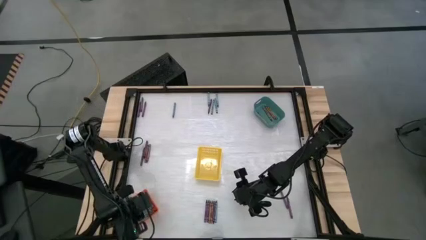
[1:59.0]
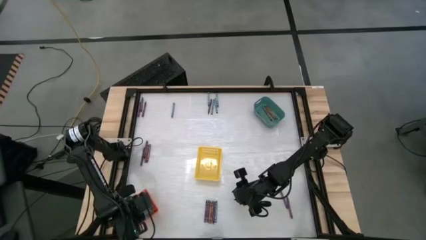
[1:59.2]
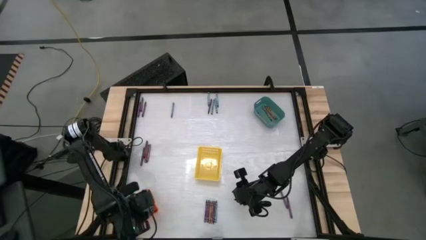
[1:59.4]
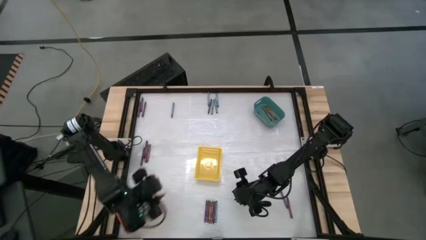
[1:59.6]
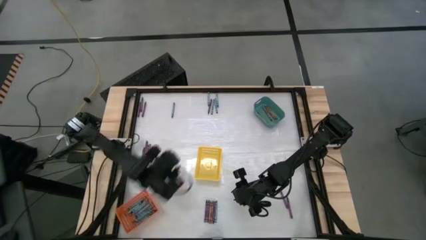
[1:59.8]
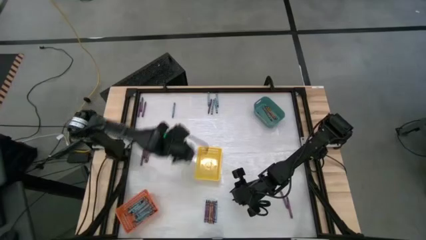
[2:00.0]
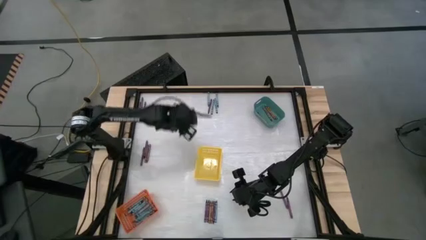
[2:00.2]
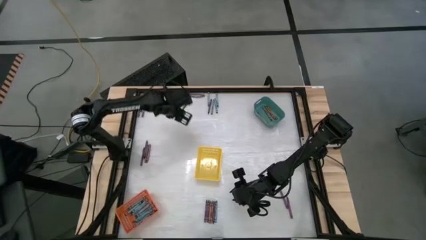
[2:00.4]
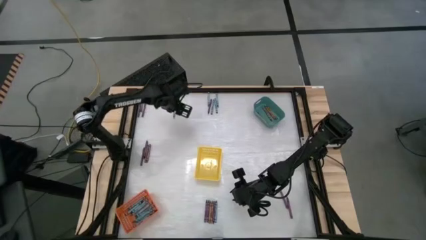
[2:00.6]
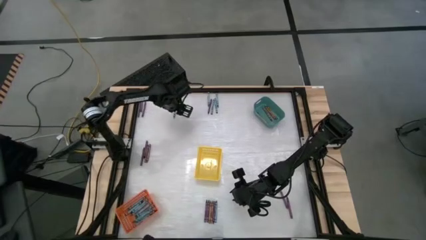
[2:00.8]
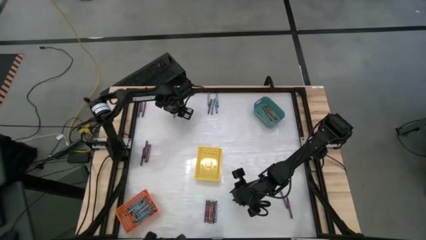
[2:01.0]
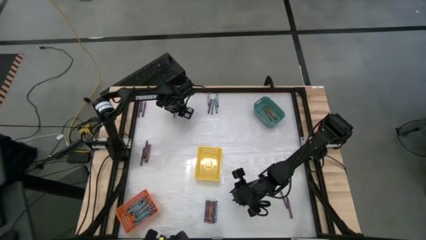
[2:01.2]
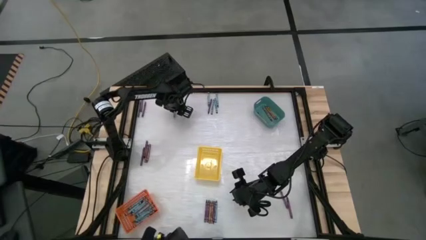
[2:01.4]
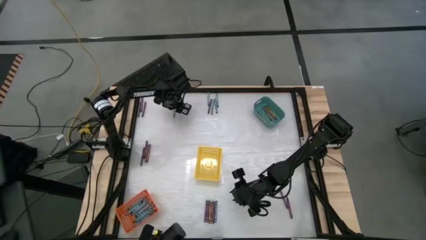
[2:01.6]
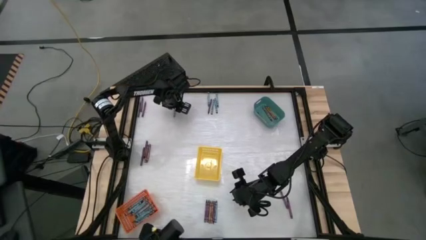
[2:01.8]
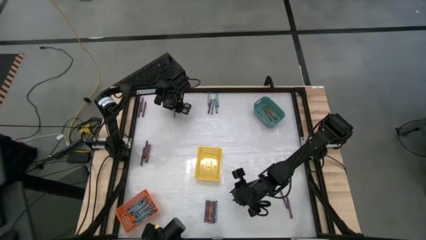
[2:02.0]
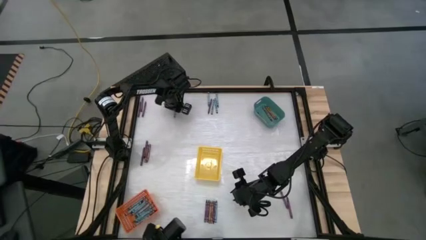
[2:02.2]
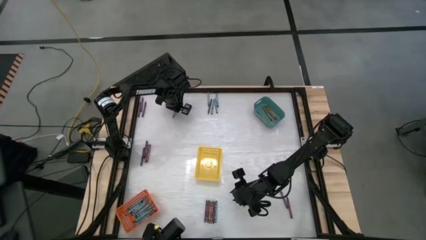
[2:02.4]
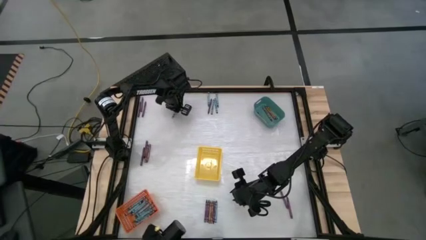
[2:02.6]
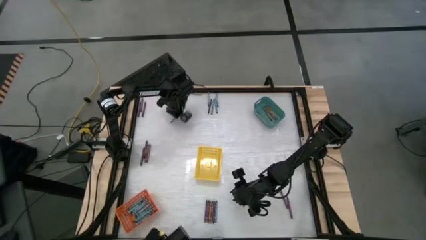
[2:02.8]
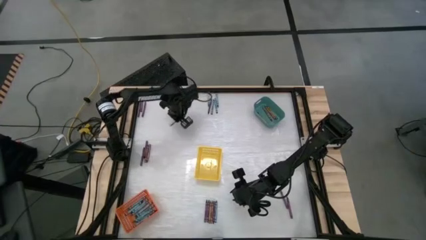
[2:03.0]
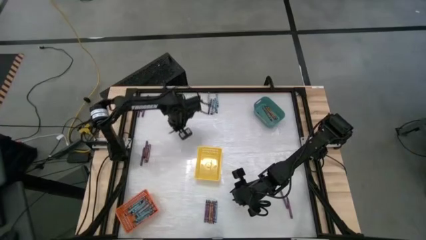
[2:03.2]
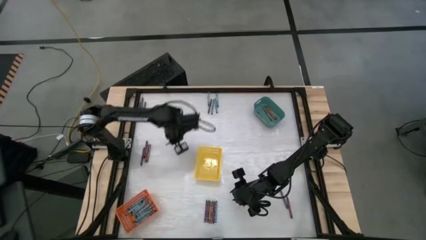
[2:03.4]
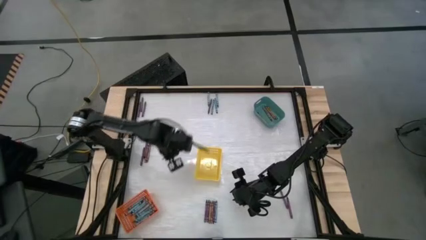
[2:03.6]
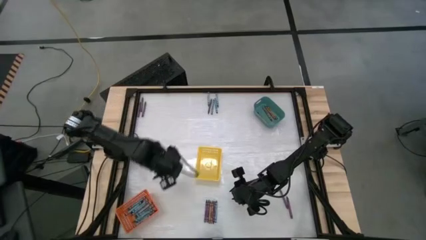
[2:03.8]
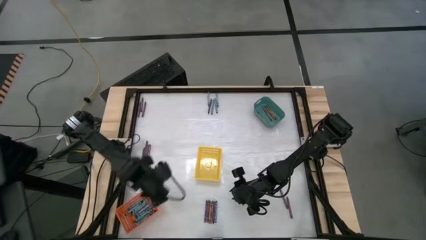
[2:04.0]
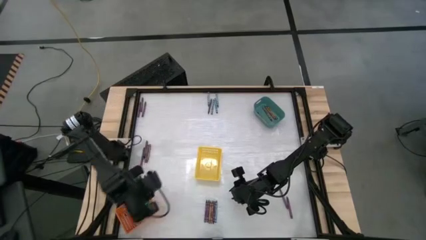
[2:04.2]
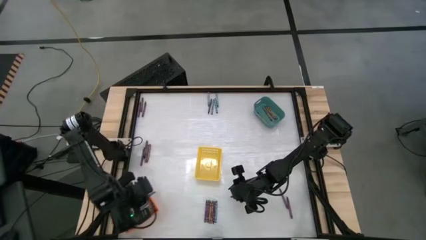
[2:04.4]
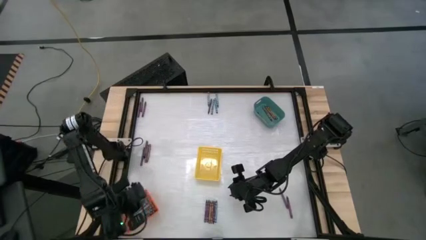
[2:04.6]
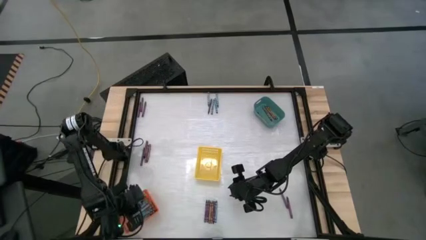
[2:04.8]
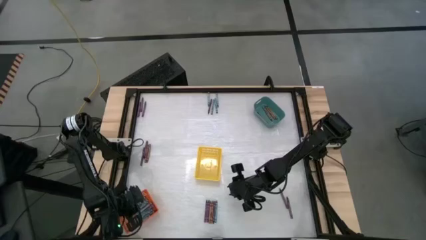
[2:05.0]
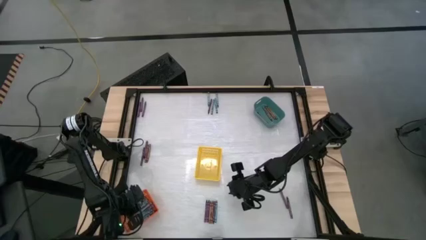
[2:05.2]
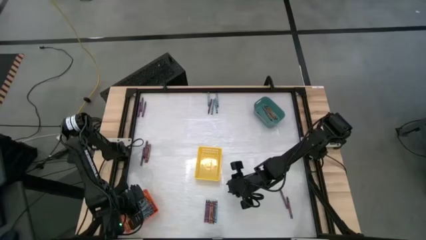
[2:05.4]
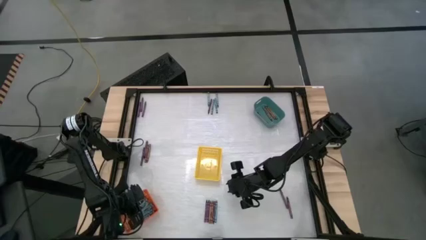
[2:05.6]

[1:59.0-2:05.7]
Task: Sort crayons
Put the light blue crayon into the orange basket

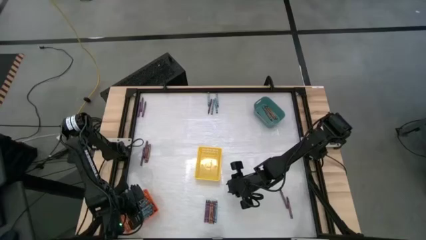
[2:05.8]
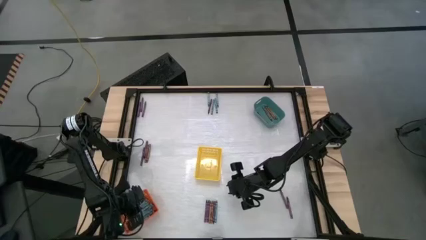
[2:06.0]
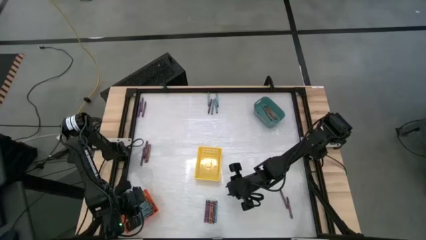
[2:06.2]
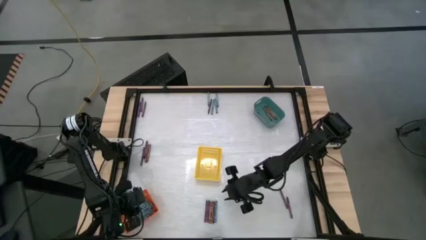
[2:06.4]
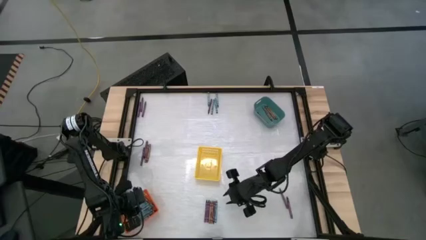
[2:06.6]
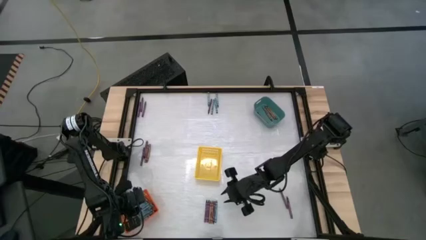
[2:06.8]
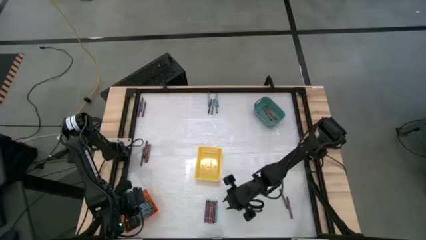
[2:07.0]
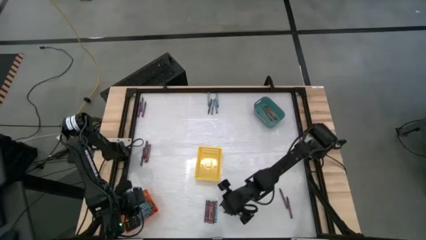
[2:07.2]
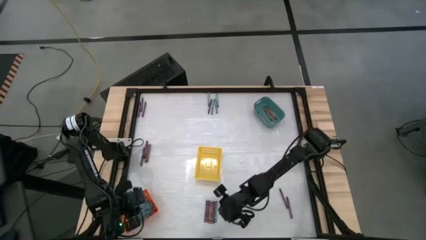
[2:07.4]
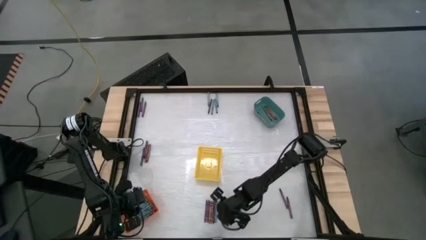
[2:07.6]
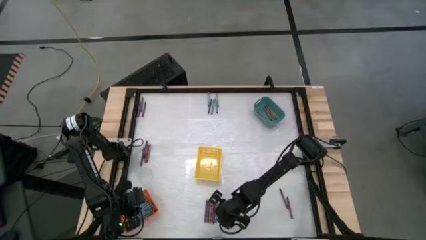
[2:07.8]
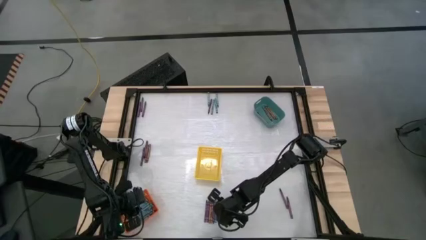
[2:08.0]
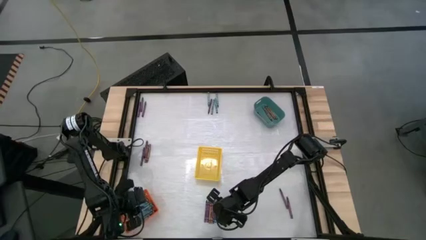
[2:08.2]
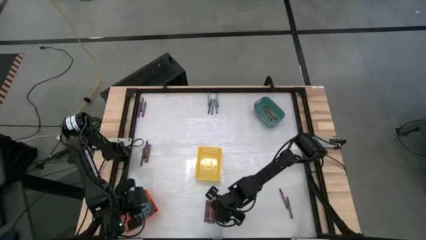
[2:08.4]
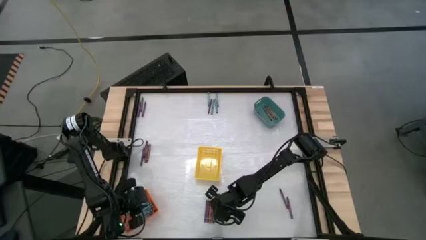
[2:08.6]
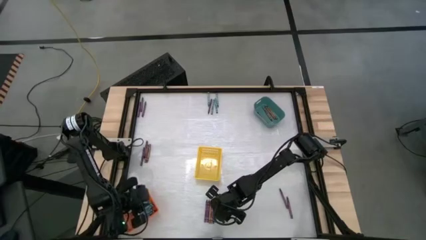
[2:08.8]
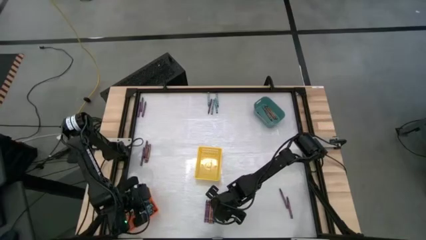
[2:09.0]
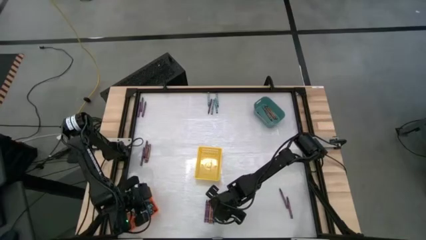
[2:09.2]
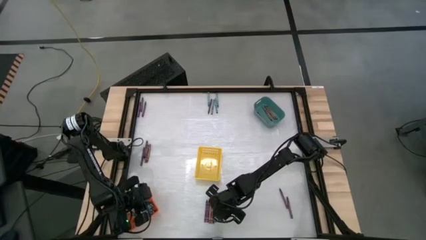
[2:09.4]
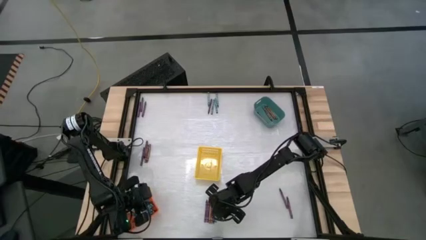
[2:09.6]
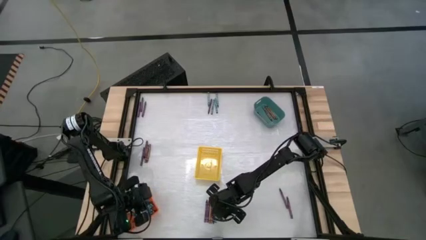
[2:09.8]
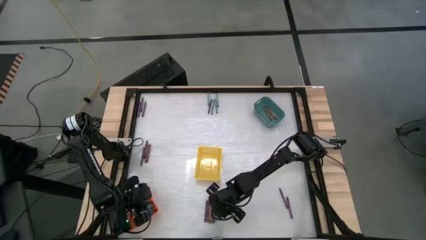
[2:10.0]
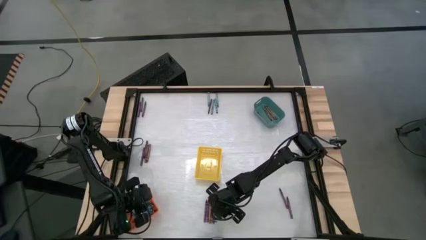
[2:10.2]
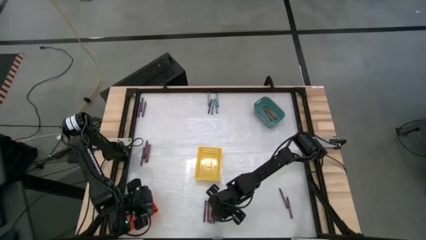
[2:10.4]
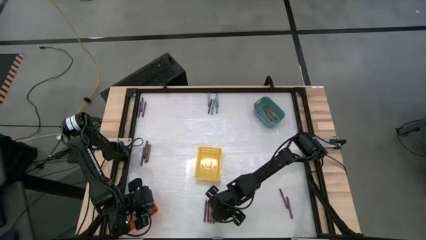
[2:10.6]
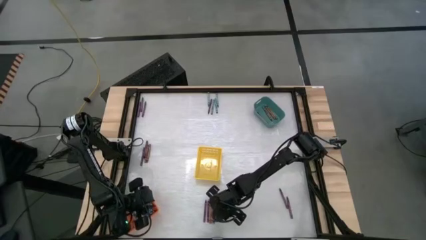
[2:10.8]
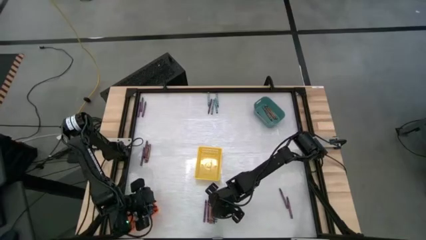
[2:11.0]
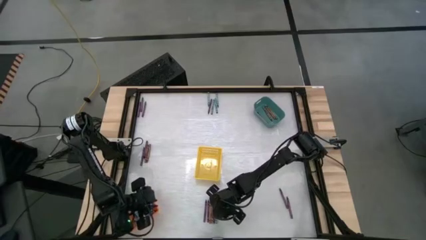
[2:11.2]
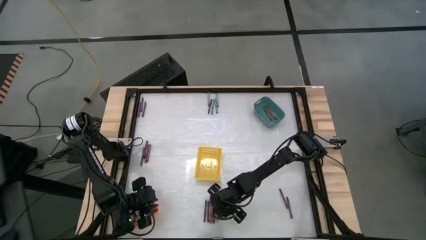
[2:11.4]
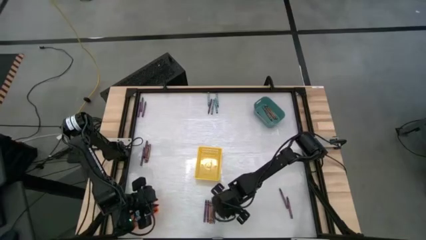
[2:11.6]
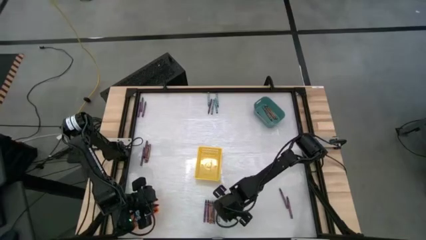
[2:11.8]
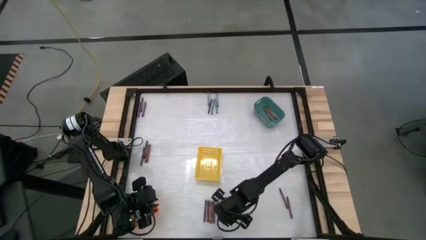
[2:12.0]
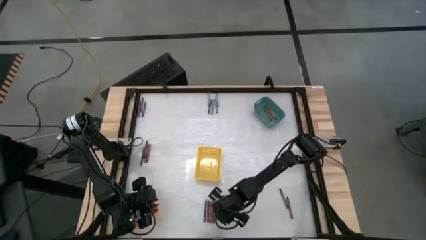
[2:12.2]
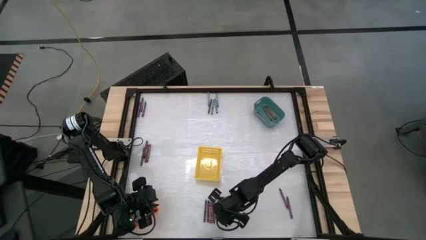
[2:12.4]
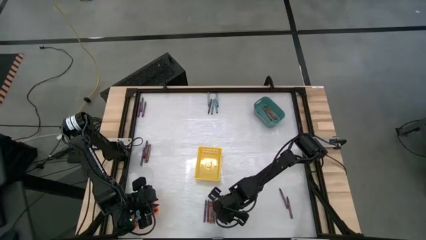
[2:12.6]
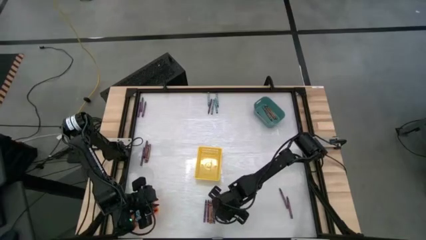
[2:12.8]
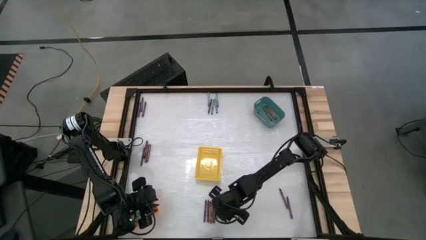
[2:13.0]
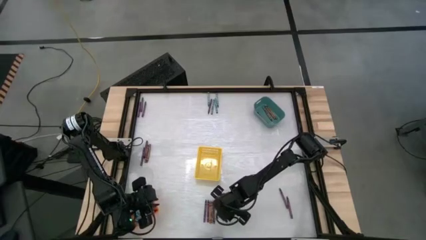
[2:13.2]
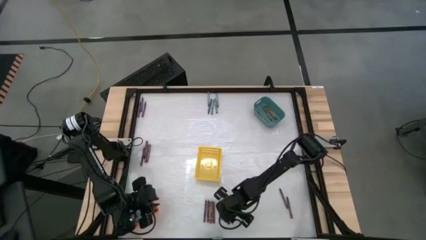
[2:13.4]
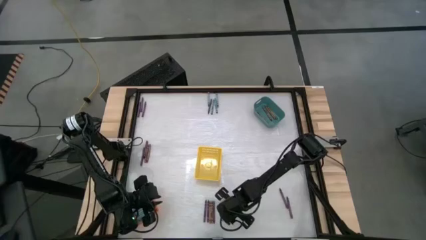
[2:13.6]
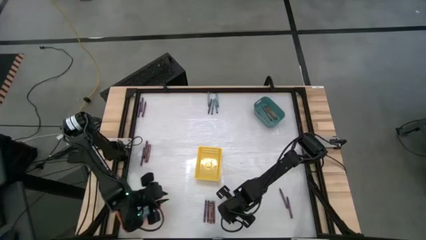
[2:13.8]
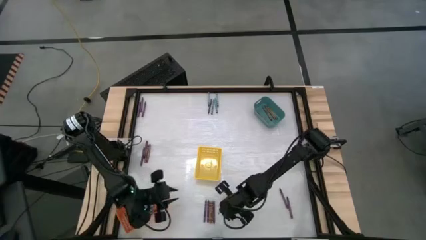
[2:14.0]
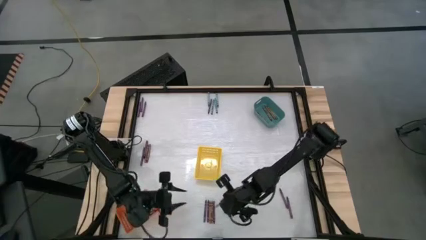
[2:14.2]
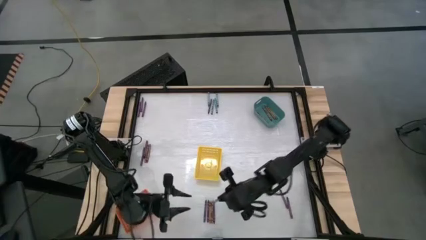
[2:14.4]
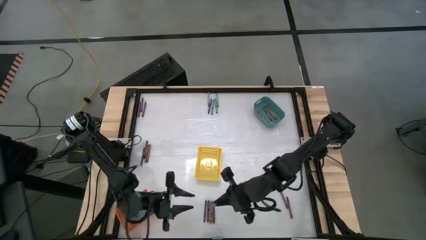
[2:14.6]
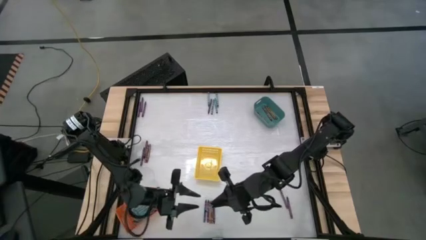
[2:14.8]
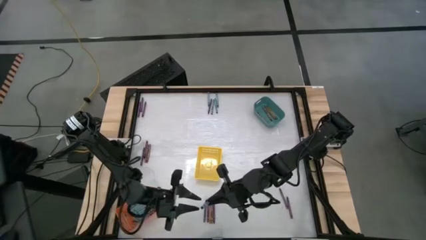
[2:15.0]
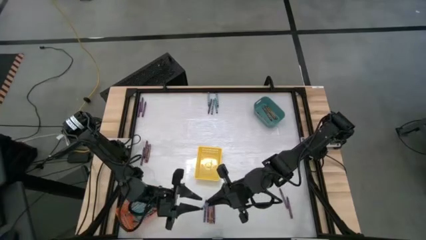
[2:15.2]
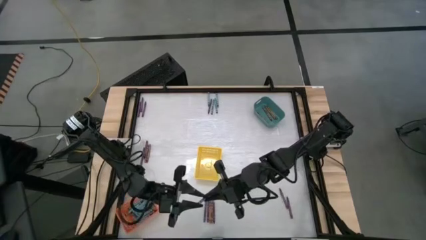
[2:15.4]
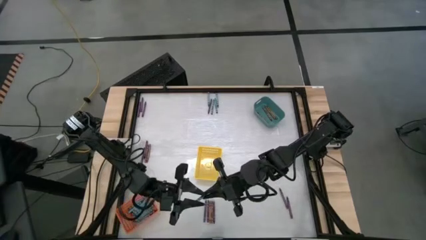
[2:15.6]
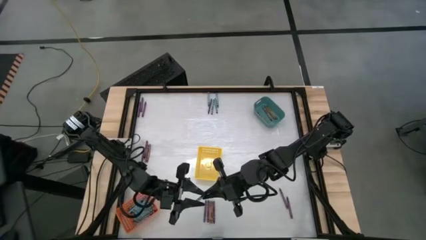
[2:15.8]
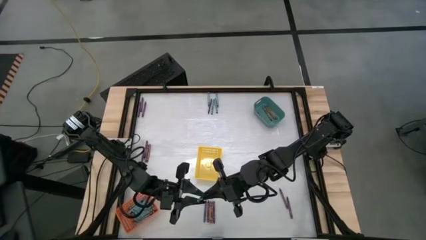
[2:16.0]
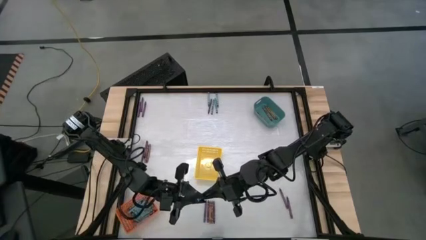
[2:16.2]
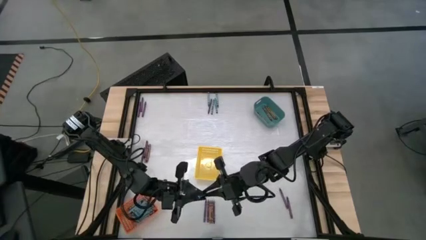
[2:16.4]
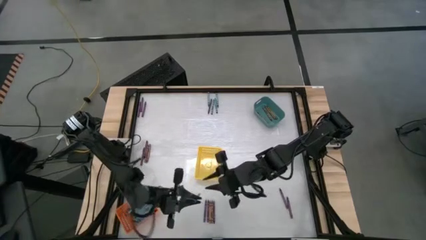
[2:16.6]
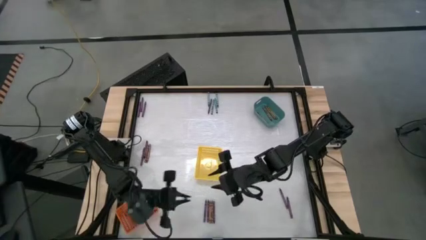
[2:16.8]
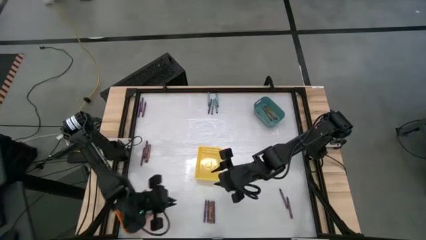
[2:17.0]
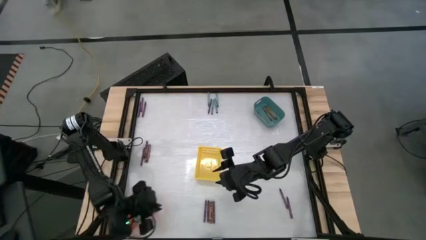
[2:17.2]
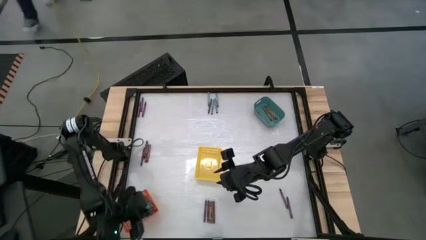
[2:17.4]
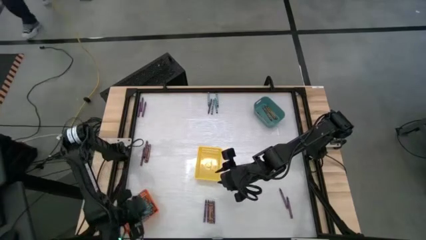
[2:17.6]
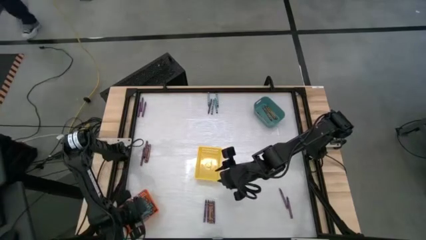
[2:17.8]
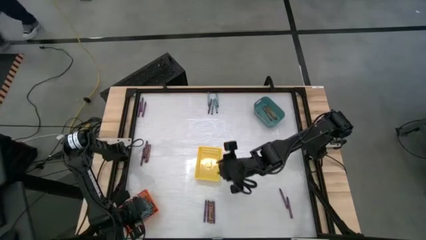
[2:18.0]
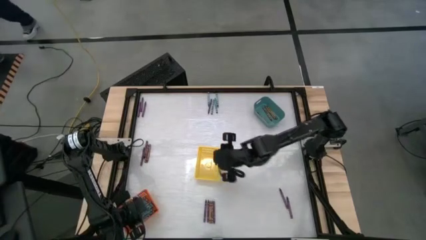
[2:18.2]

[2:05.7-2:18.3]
Put the dark blue crayon into the orange basket
